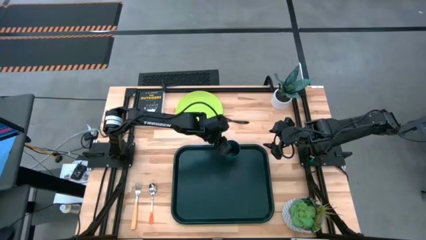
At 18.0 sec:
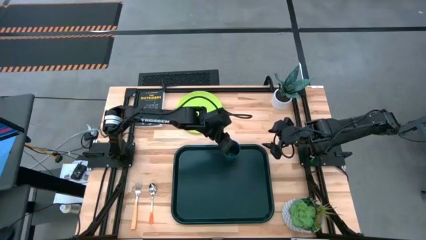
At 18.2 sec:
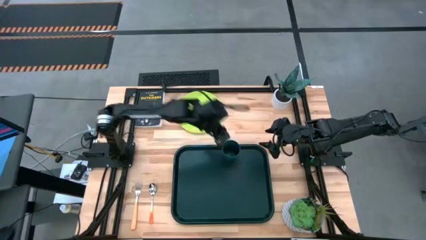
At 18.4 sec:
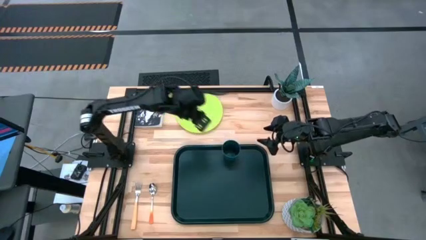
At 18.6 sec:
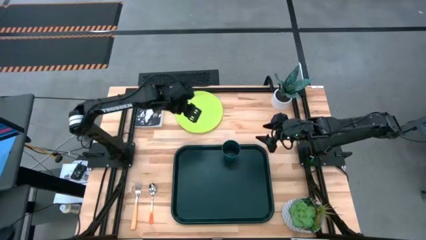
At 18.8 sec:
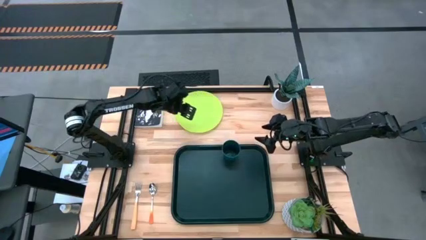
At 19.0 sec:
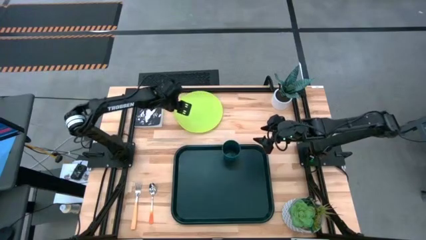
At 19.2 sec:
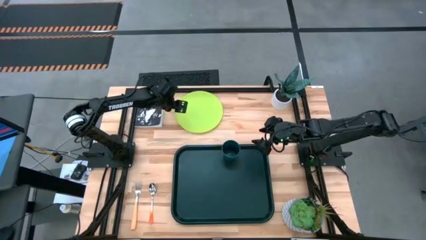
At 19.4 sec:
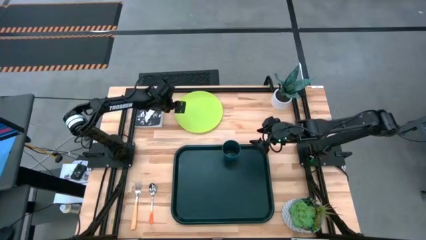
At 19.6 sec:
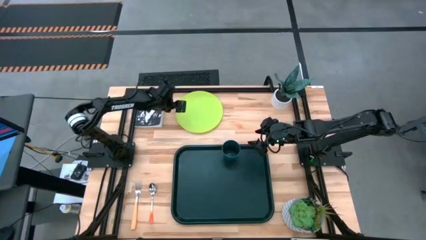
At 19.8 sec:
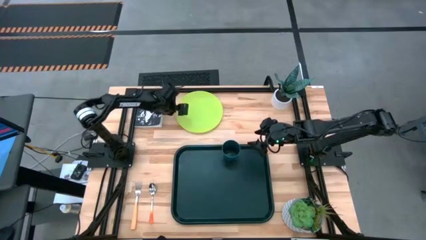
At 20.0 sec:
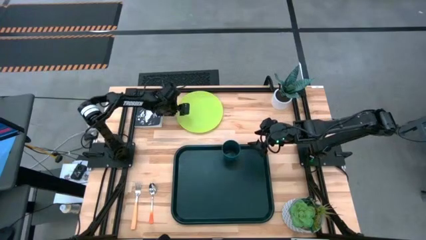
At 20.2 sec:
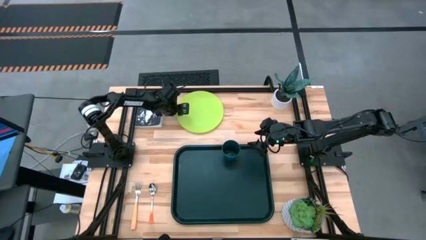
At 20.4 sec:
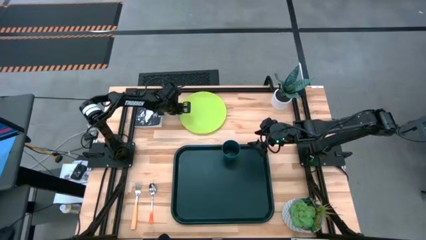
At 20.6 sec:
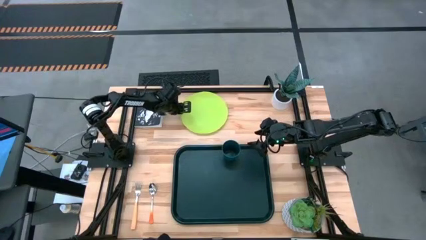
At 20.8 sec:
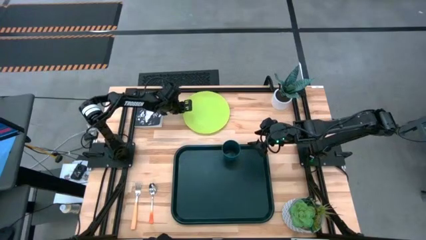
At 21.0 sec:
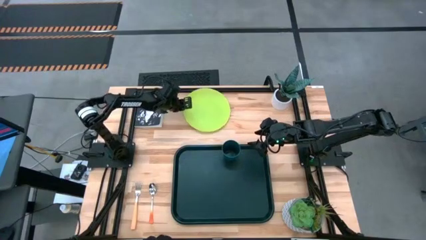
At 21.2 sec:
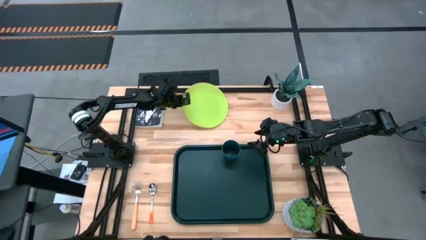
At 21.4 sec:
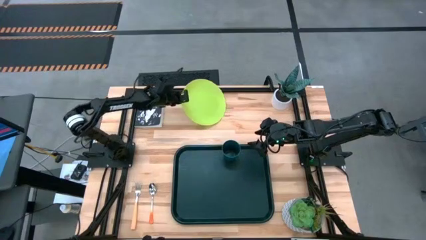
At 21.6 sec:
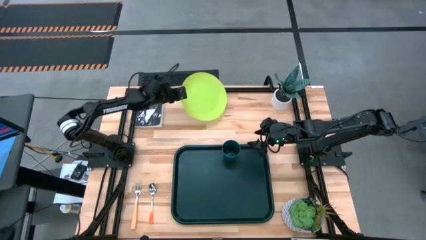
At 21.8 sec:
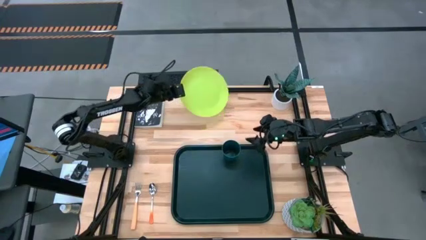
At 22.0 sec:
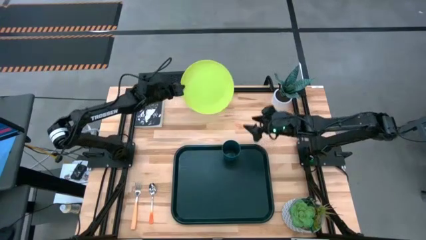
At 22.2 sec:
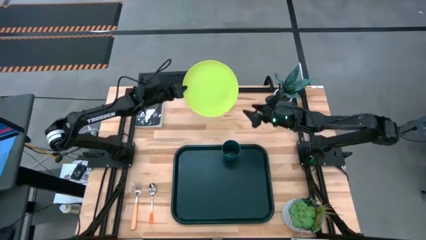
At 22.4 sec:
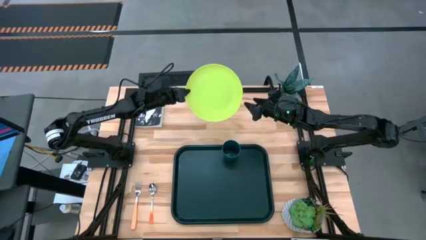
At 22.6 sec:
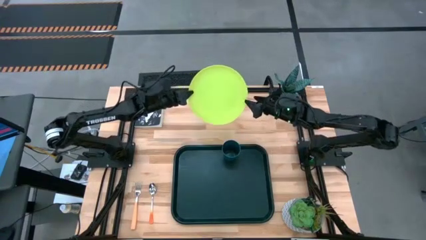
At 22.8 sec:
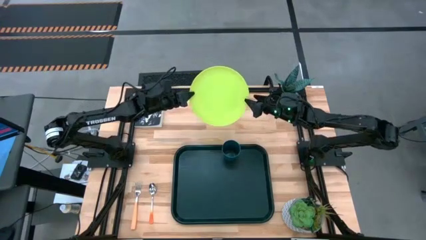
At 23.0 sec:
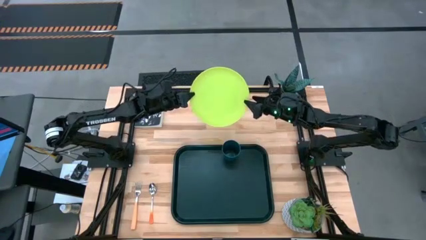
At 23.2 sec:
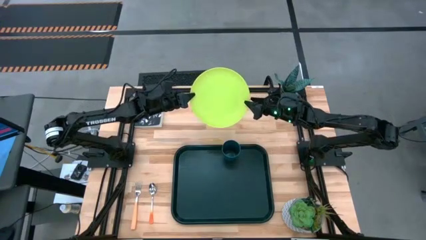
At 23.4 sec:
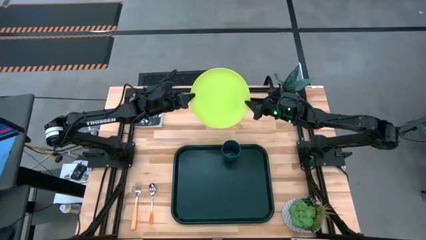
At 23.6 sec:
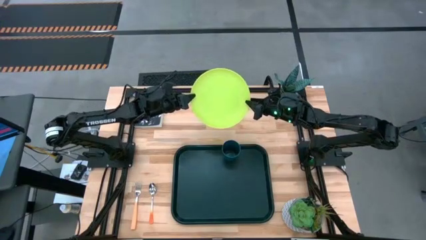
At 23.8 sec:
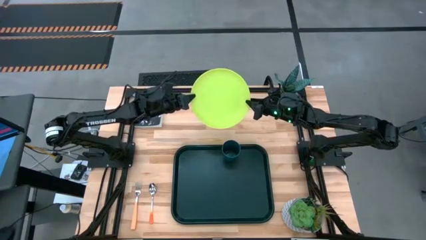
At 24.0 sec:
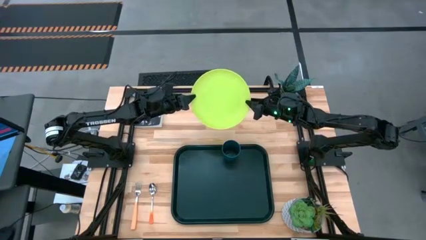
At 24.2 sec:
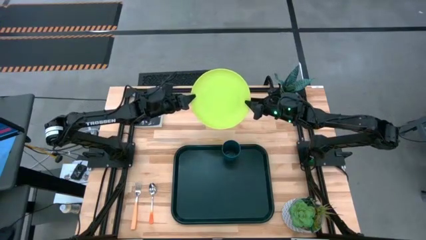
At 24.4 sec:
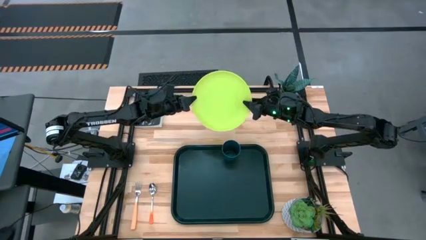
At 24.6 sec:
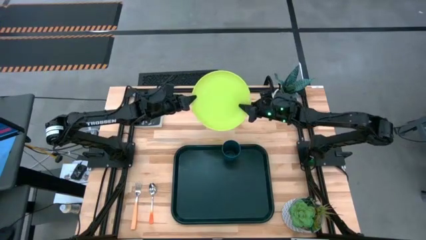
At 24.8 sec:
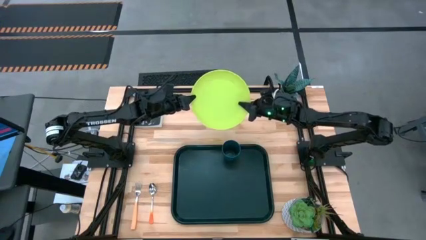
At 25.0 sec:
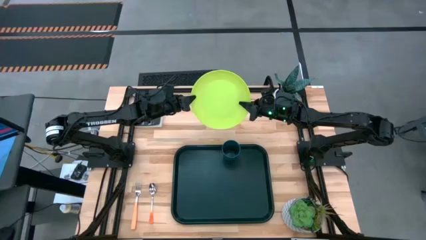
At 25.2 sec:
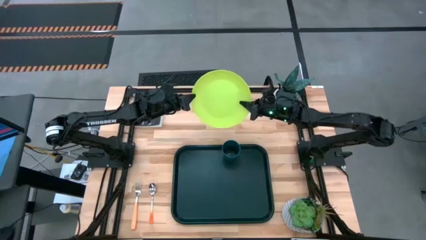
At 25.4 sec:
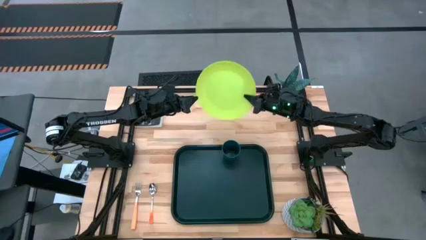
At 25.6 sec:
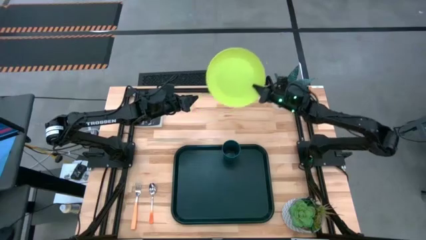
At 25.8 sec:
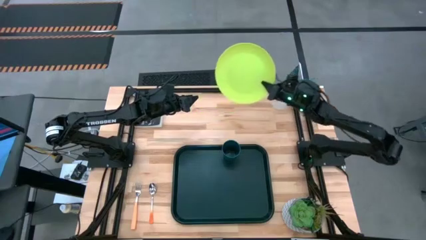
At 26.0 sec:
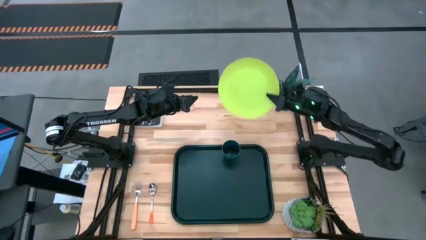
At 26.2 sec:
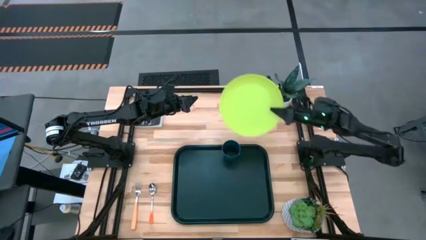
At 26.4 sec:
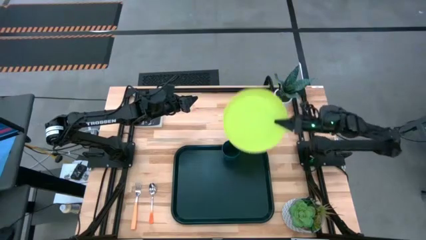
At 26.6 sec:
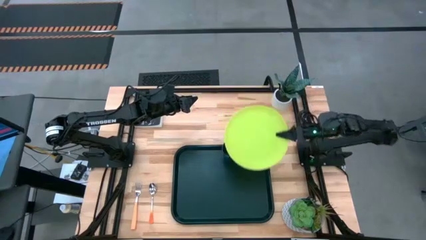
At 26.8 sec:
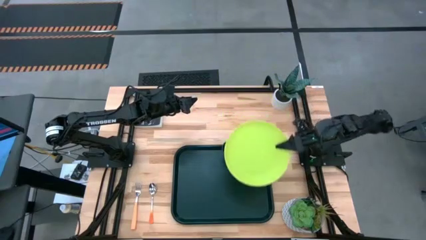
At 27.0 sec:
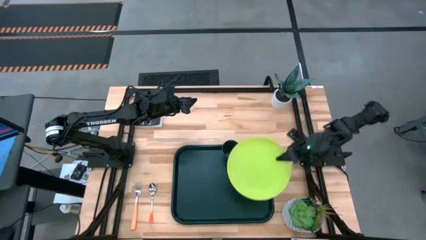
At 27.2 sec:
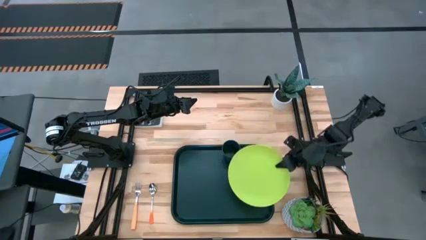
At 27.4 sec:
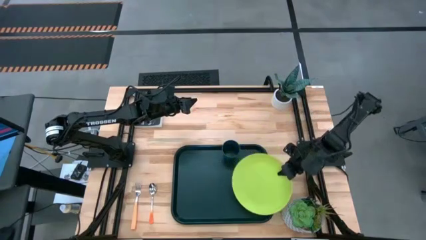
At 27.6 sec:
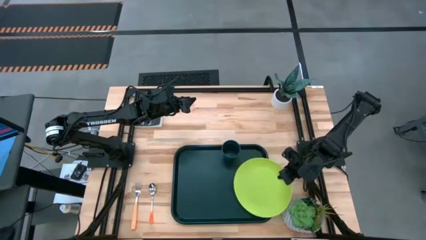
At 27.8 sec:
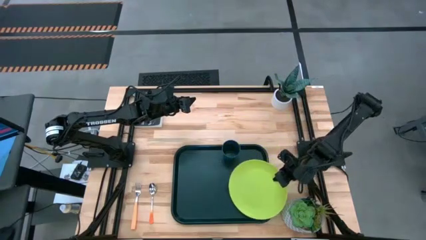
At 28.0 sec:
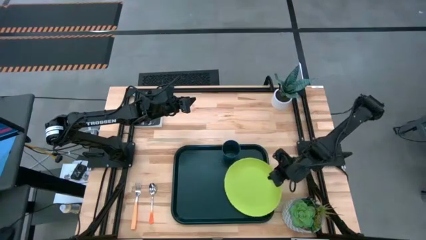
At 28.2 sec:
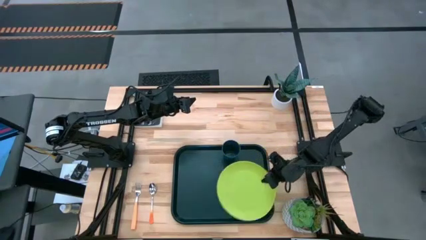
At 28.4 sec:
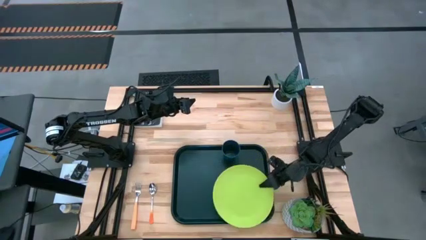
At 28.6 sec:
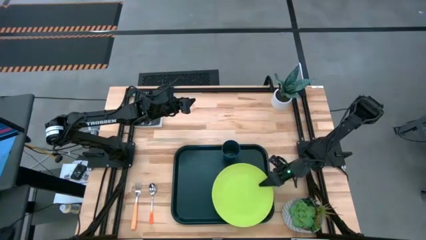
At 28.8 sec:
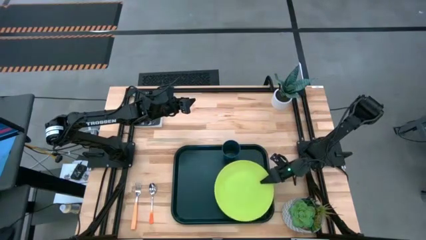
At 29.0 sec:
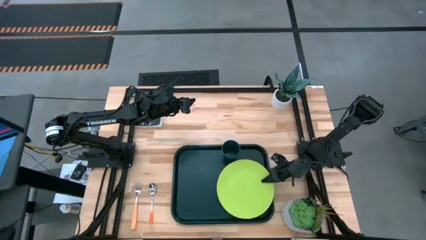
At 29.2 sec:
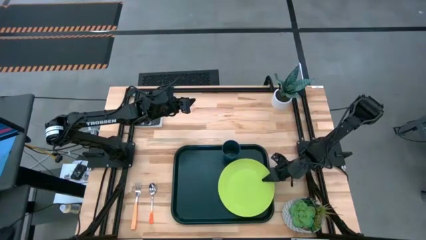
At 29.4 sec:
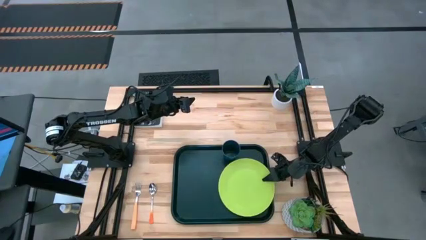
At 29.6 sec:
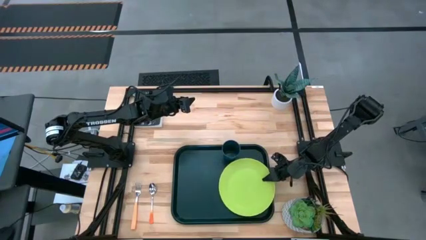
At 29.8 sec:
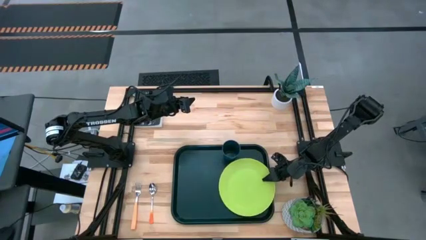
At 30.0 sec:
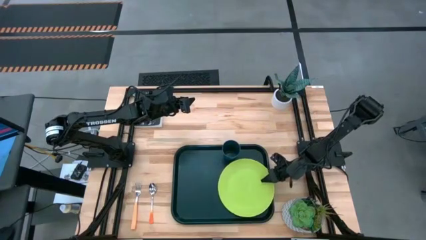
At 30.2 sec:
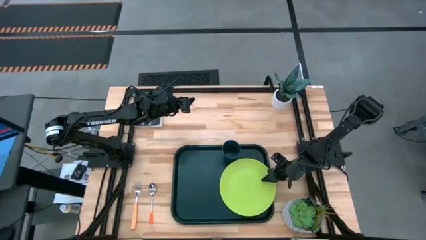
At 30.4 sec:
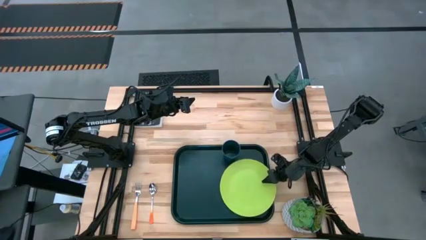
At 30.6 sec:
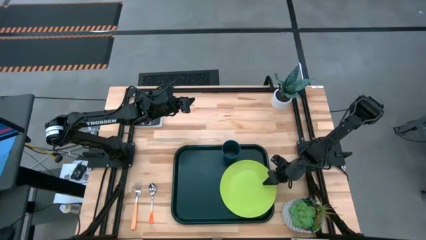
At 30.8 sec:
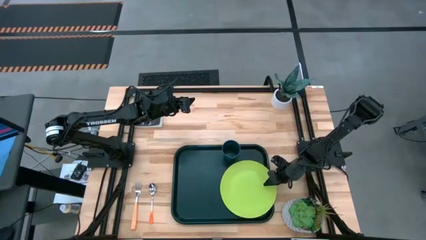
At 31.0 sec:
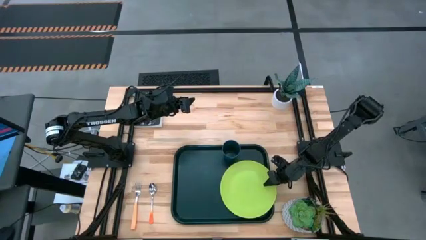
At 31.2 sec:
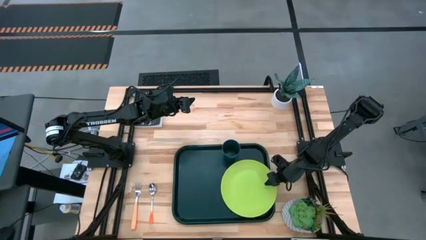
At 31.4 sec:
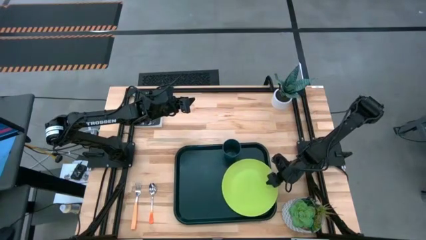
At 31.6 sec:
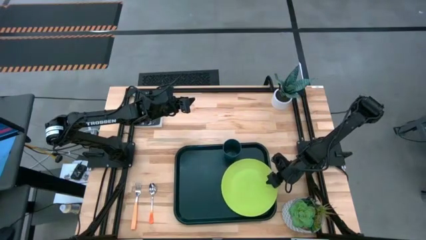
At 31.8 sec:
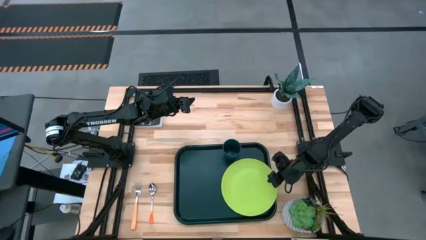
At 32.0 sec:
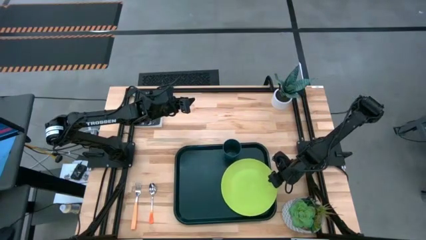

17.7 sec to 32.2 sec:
Task: Pick and place plate/cup/fork/spoon on tray
Put the green plate on the black tray
